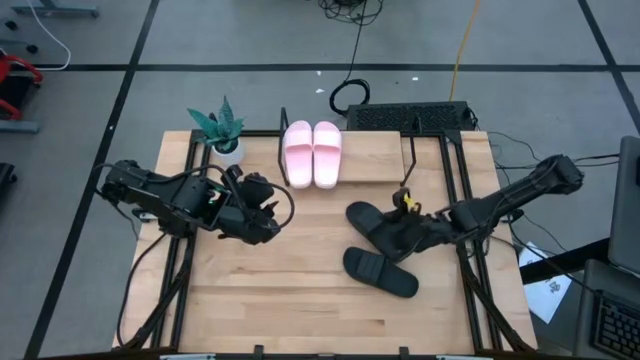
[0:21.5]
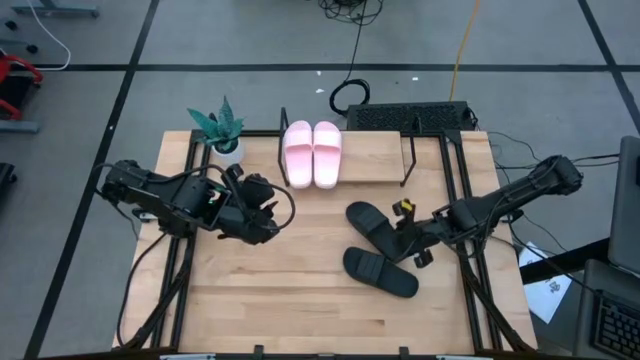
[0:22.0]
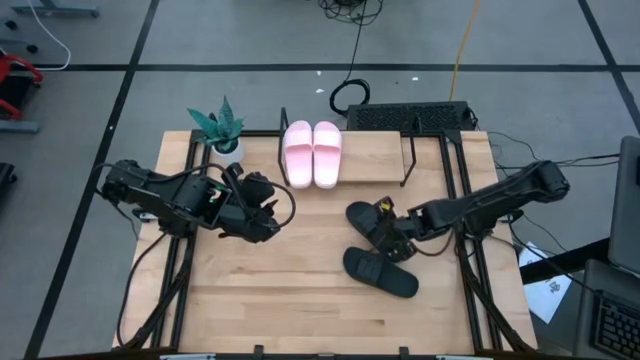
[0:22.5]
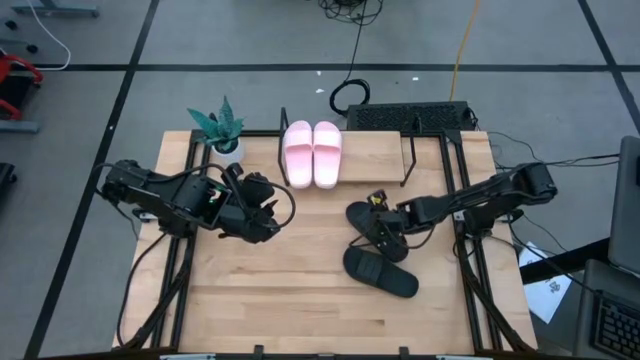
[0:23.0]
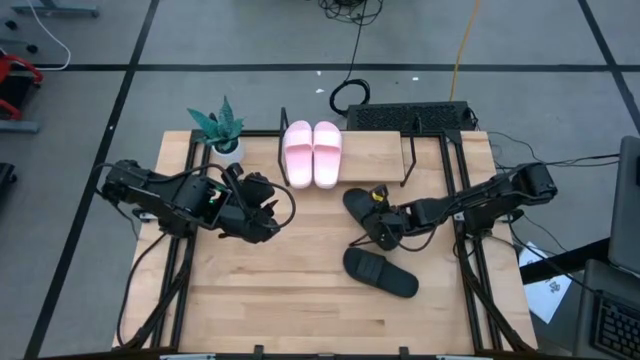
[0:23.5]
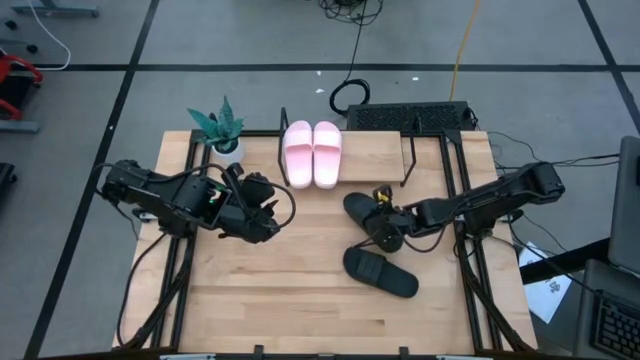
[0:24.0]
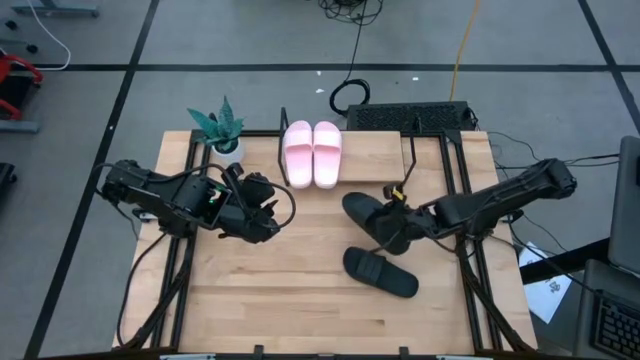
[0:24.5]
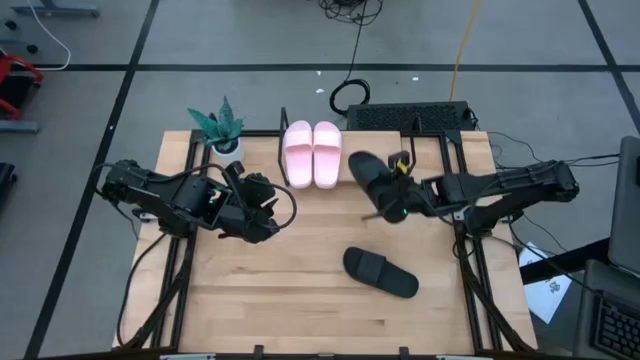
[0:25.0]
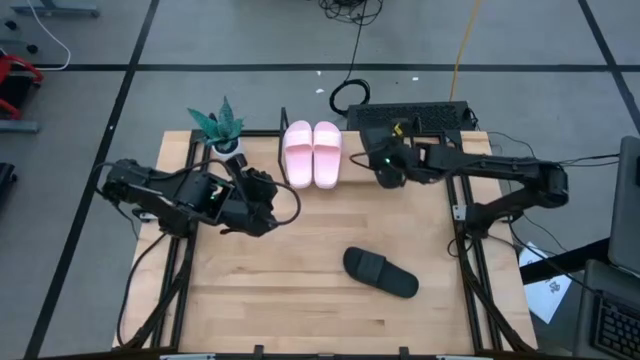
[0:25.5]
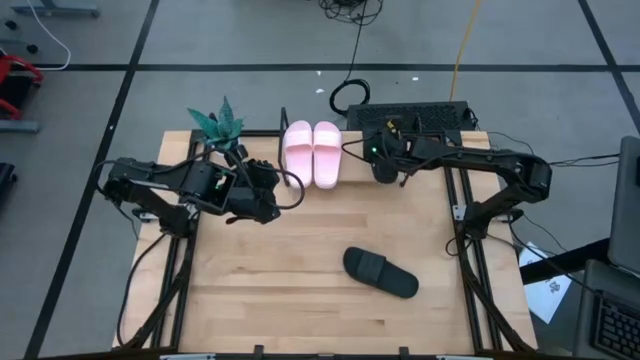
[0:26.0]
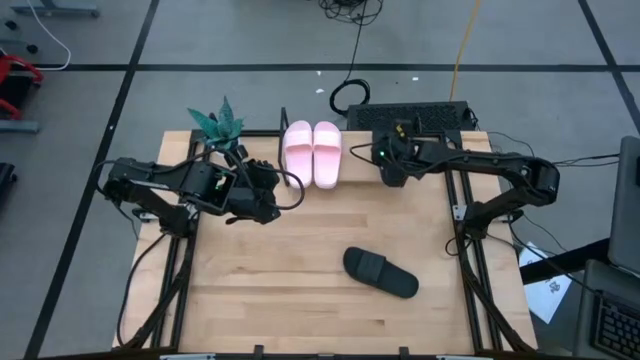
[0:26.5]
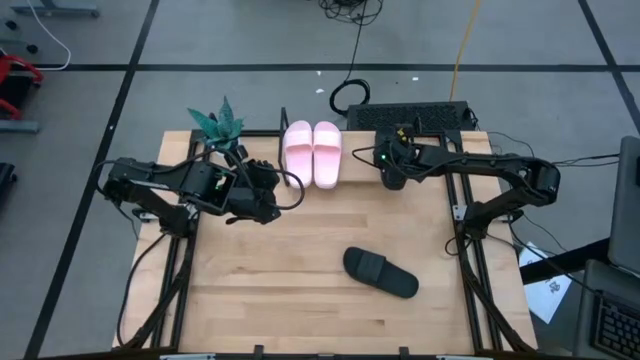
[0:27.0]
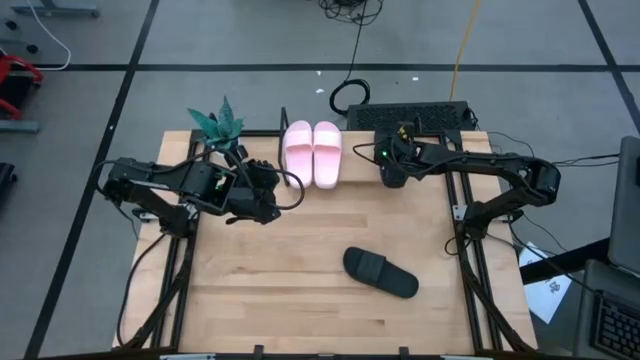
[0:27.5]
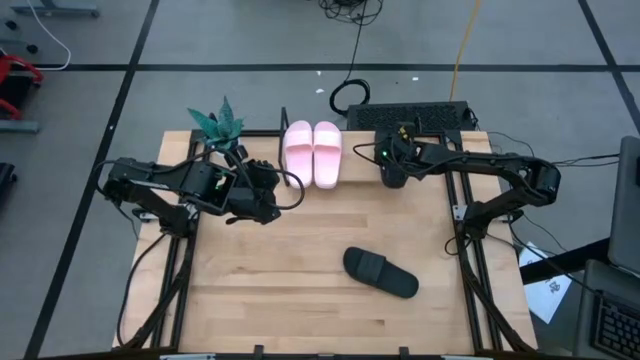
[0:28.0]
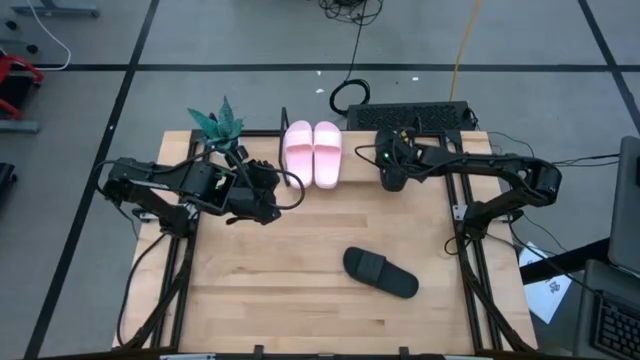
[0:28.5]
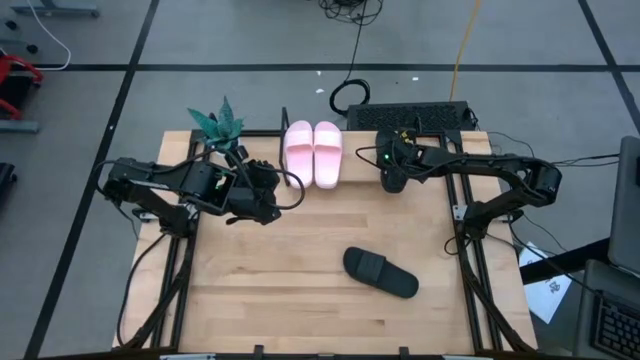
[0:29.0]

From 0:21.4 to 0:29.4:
Task: Pick and place slides into the shelf
Put the top black slipper on the shelf

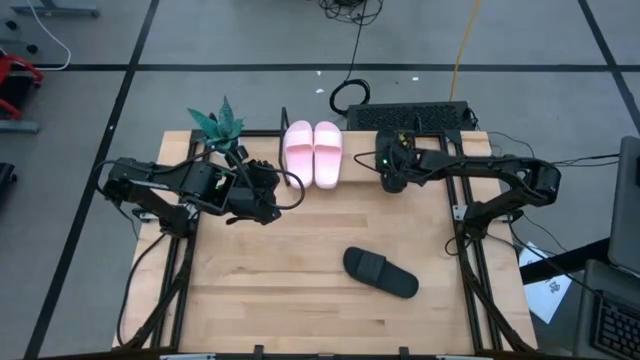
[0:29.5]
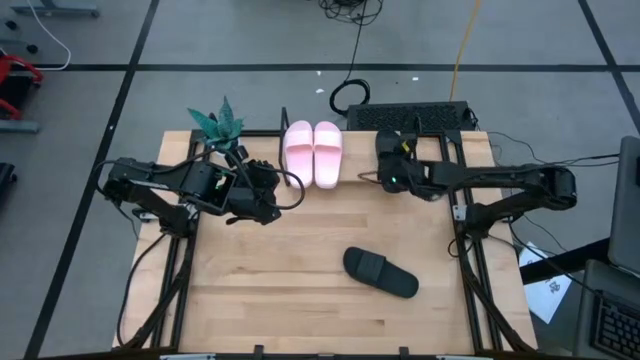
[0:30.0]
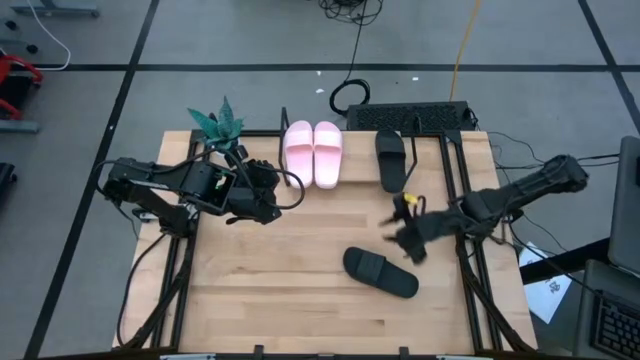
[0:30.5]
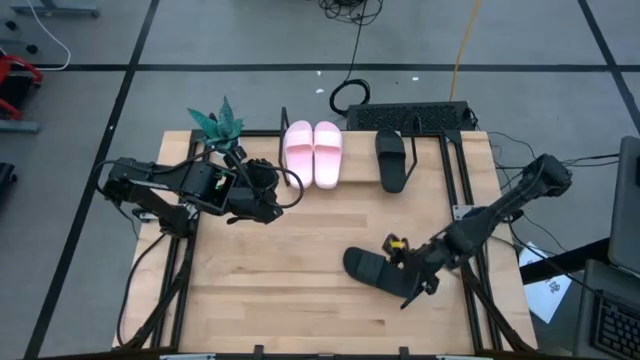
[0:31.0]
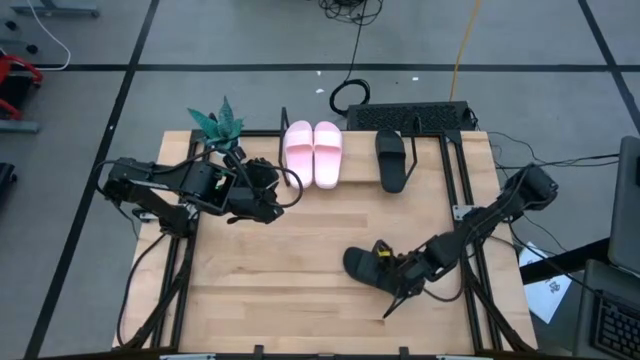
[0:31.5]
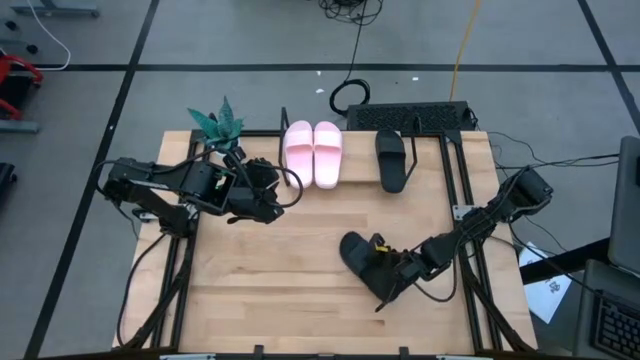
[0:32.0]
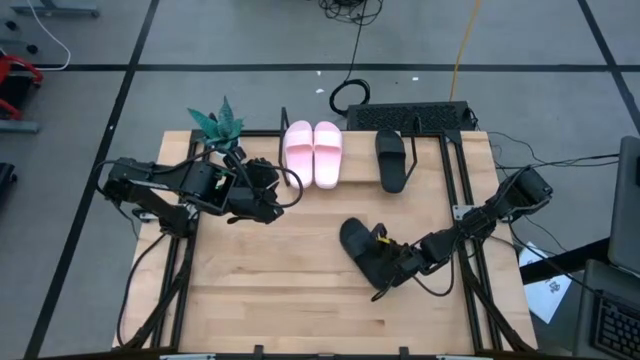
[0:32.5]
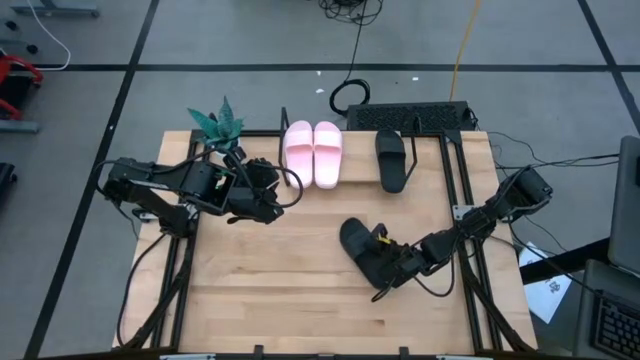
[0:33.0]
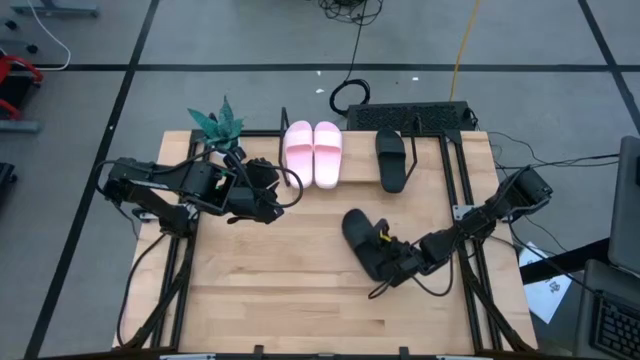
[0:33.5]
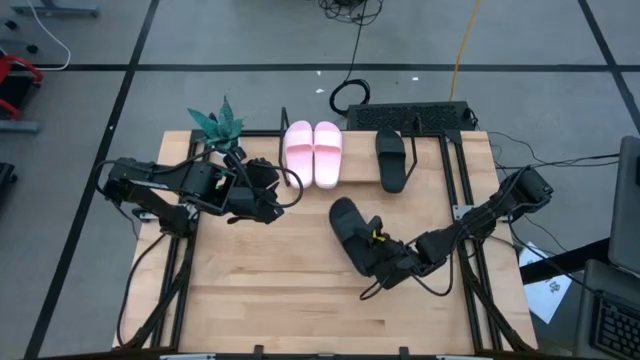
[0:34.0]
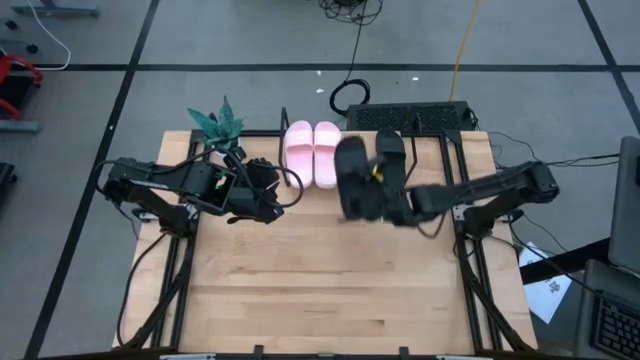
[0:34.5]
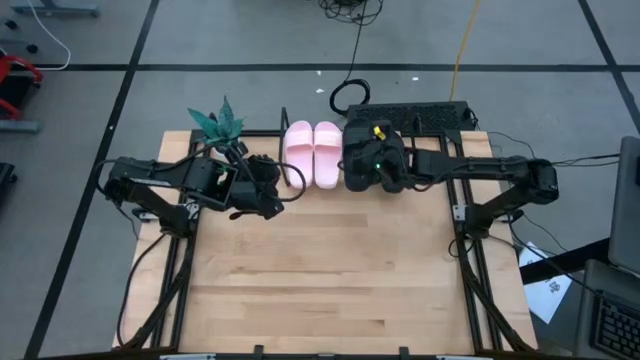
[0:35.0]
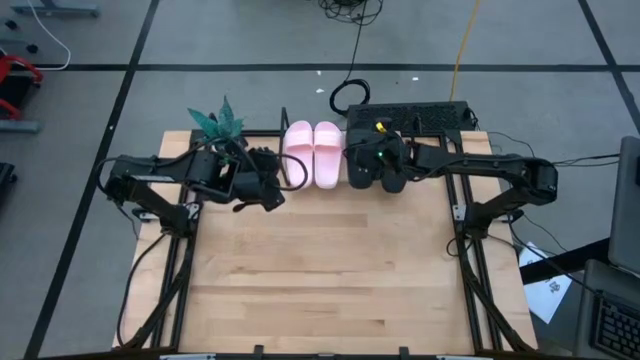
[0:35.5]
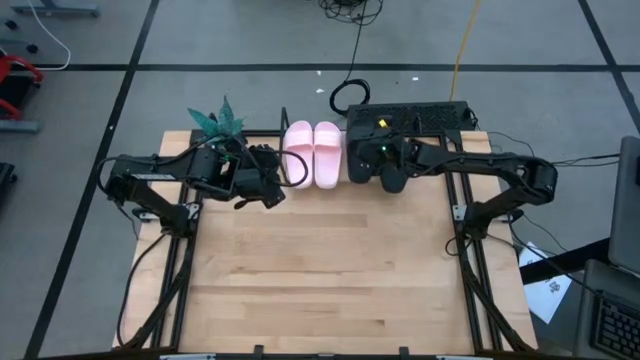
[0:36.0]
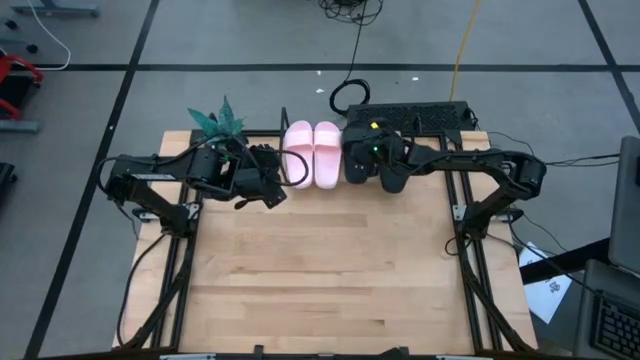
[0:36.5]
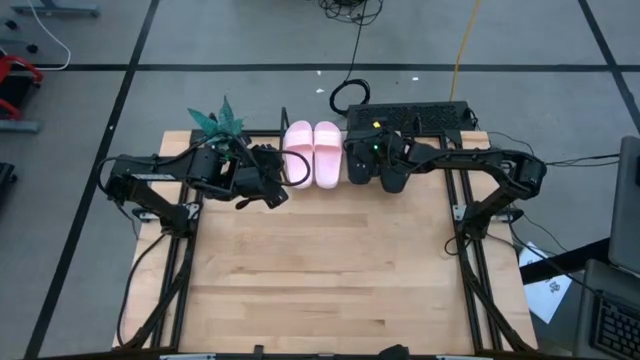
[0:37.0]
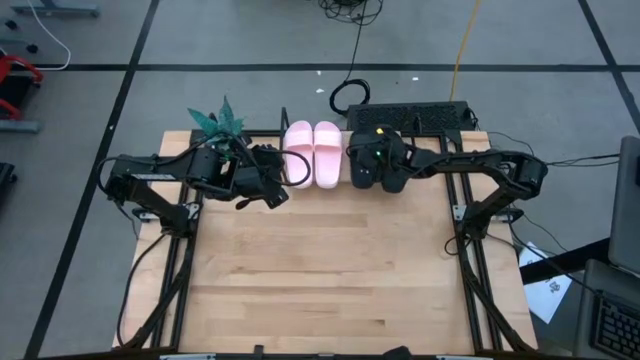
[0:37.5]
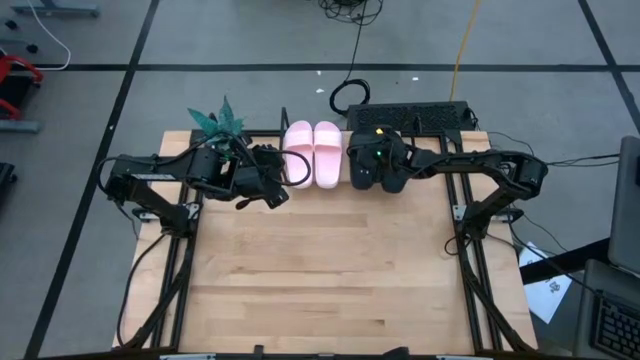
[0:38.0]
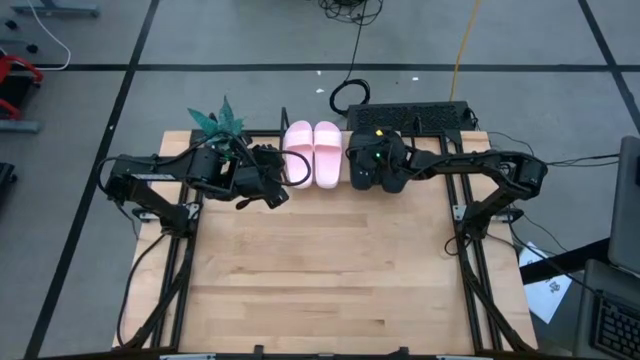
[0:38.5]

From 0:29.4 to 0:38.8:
Put the black slipper on the shelf

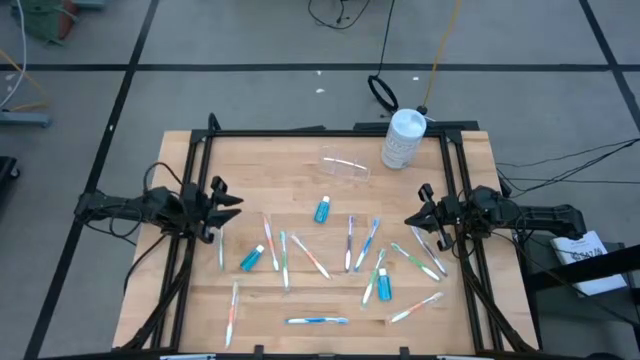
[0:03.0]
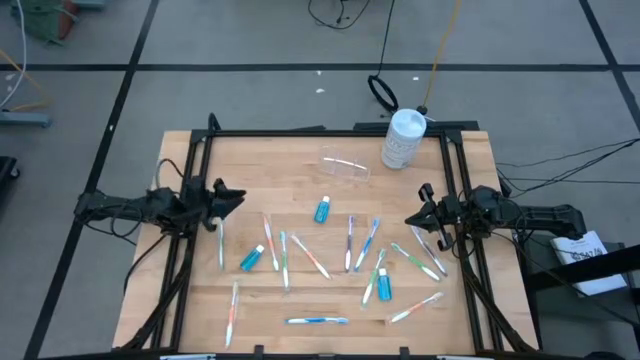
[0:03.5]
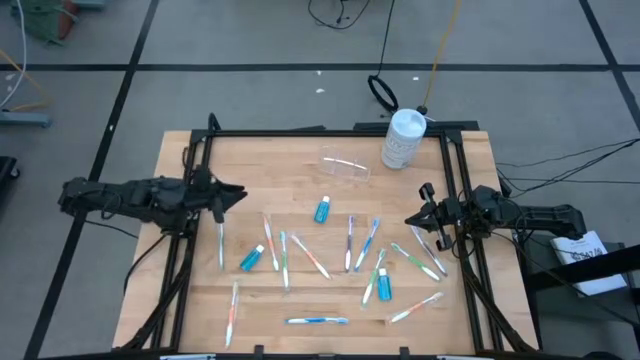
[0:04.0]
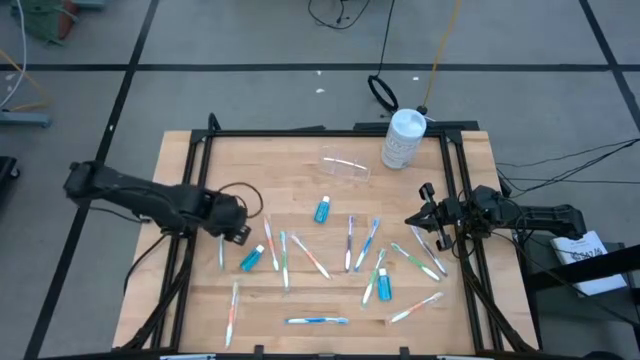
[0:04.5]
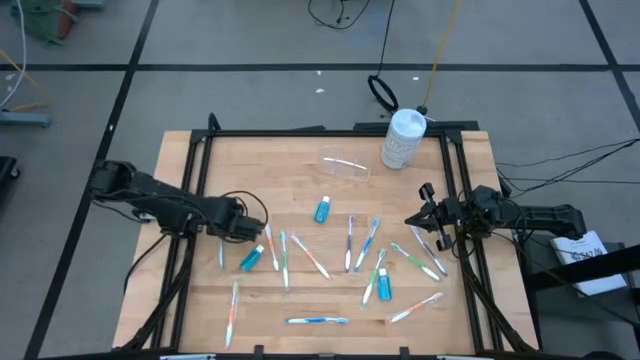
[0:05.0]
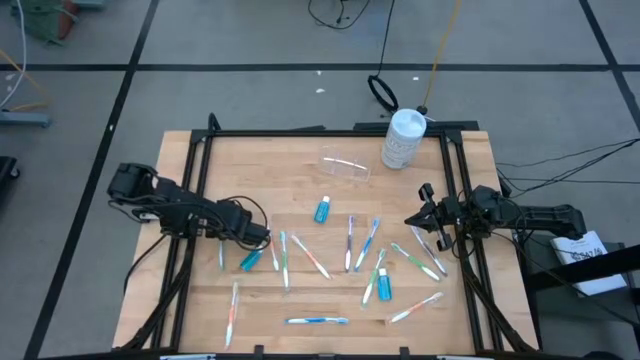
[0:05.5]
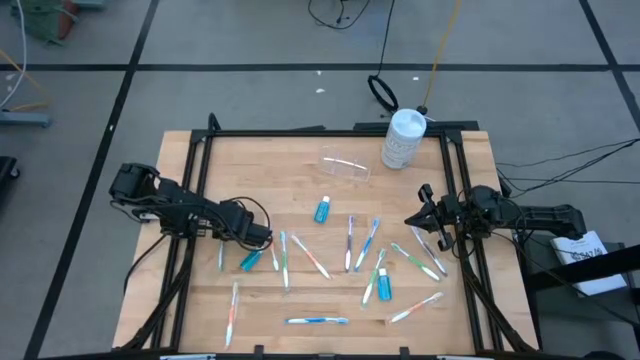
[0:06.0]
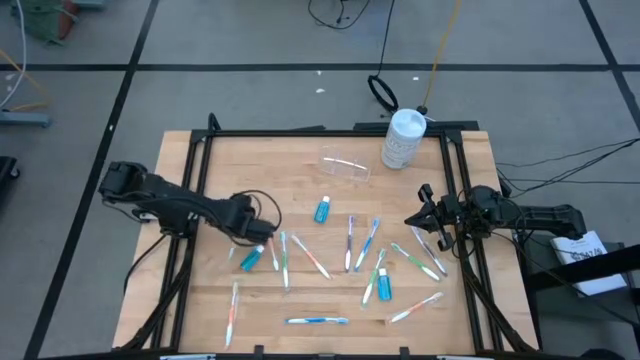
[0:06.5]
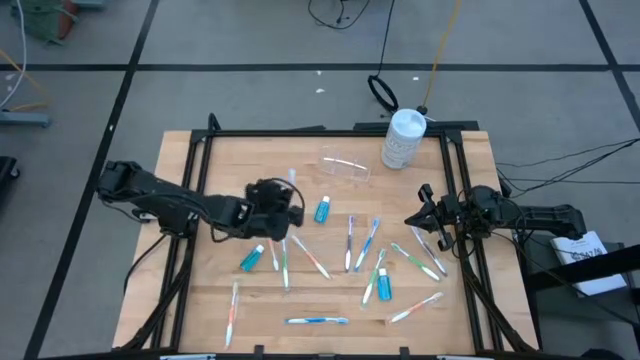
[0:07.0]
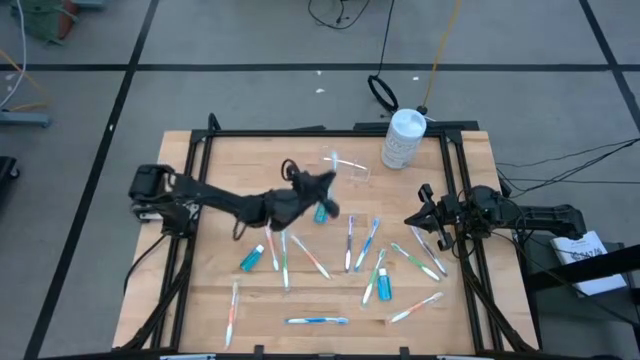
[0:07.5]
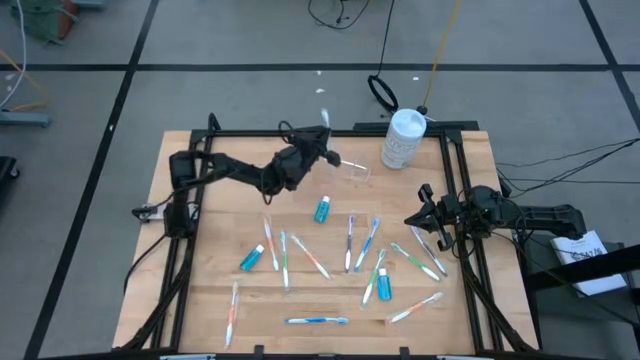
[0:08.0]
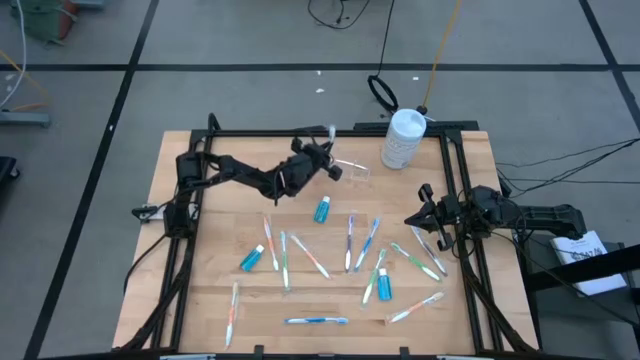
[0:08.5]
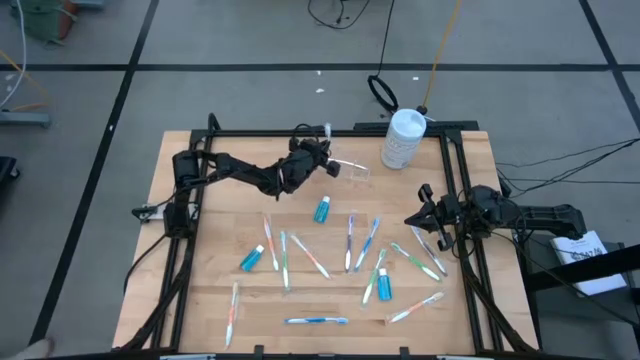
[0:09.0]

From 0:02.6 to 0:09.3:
Task: Pick & Place toothbrushing station
Put the green toothbrush into the transparent organizer
